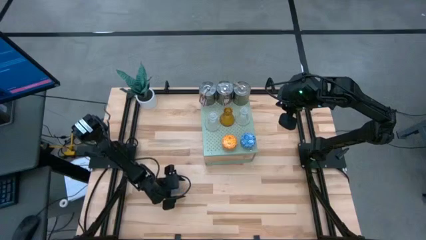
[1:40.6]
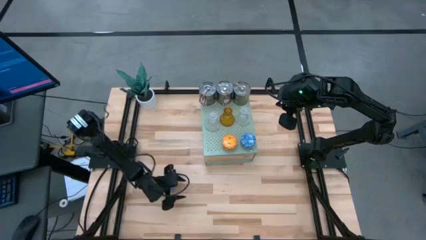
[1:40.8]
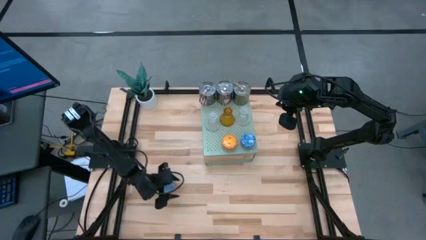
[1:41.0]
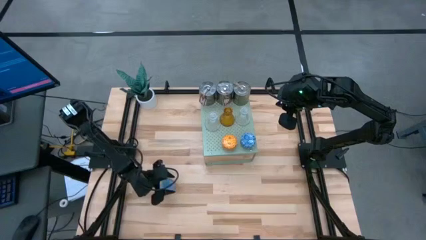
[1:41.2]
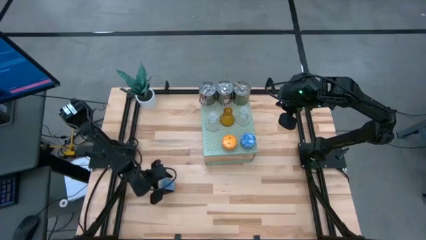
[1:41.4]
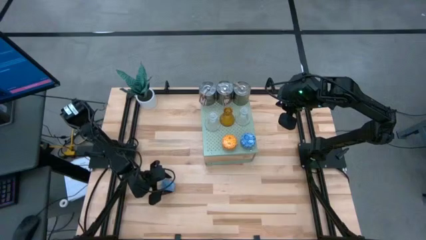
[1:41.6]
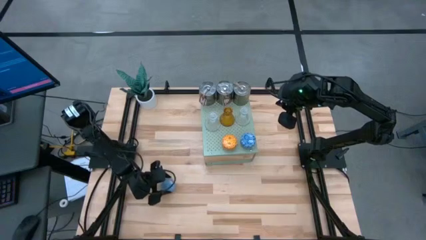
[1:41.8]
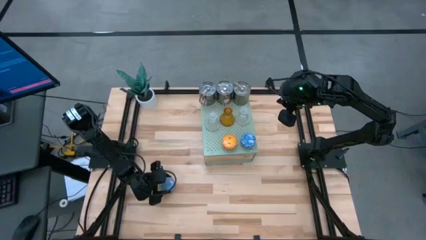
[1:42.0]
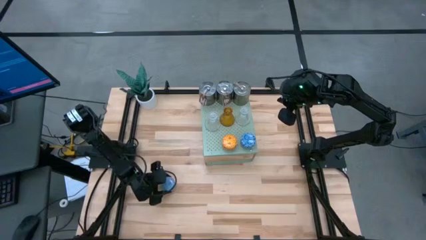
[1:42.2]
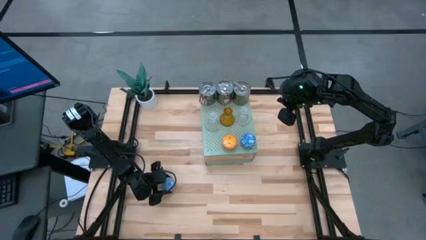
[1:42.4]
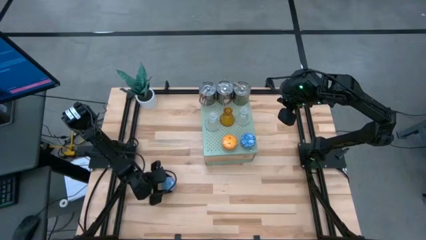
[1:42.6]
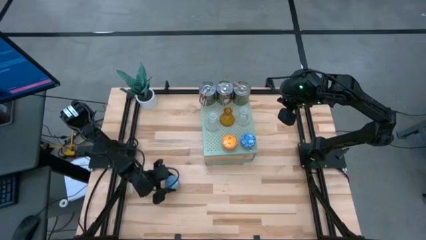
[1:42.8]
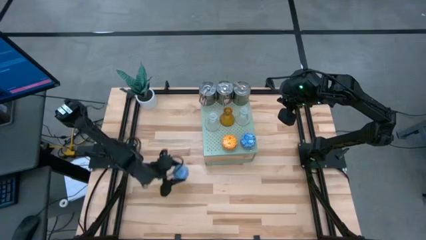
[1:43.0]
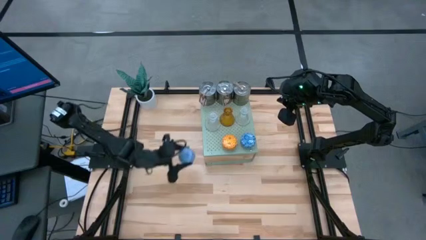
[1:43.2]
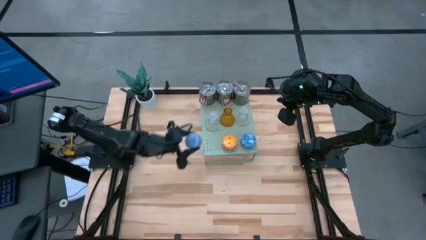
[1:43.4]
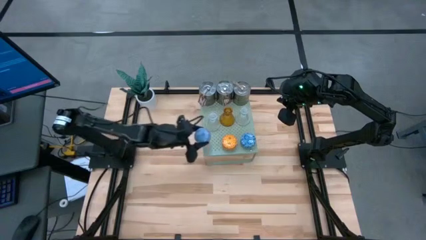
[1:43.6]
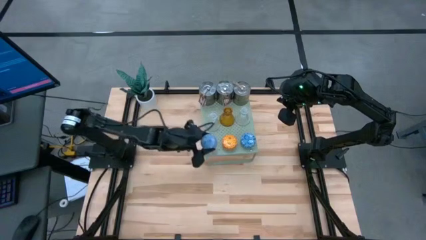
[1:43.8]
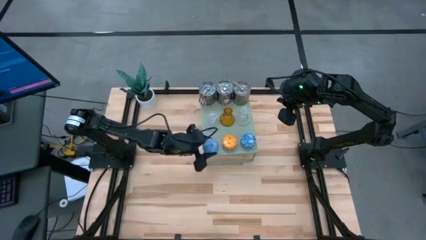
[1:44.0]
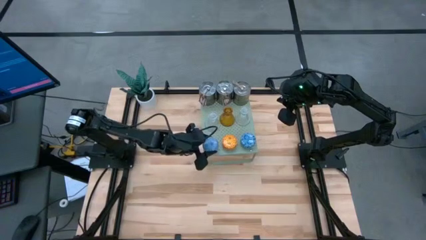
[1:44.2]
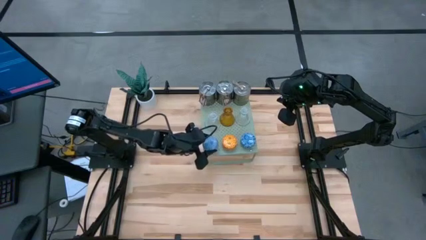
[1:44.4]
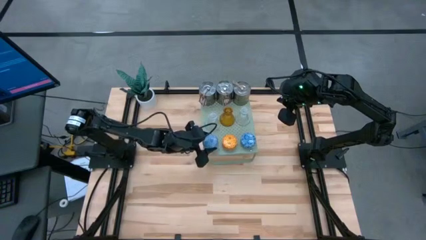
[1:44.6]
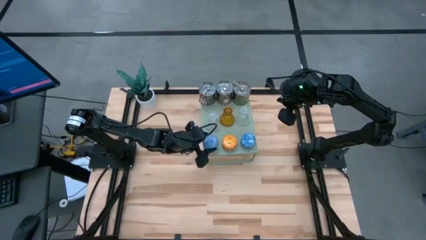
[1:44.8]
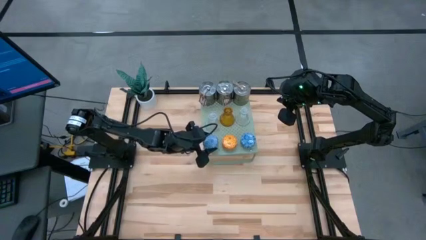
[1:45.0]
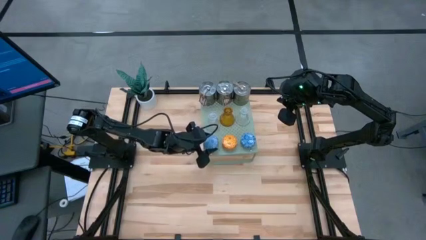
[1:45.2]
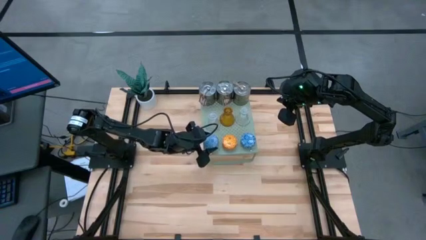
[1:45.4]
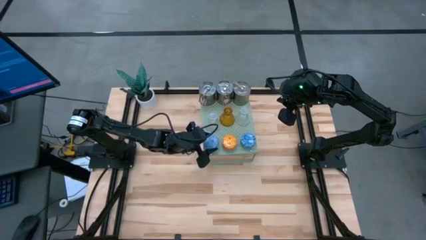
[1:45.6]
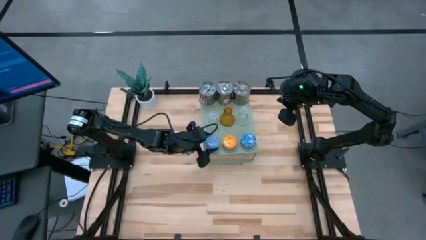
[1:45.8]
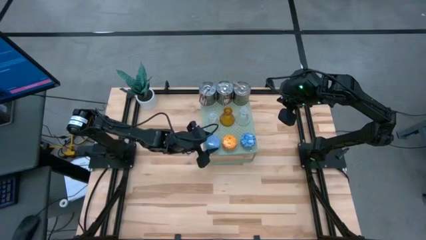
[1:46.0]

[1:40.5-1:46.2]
Task: Pick & Place candle stick holders
Put the blue scented candle on the shelf

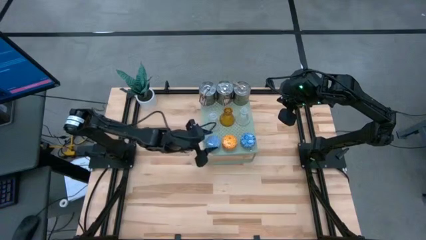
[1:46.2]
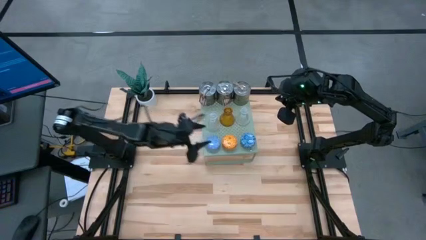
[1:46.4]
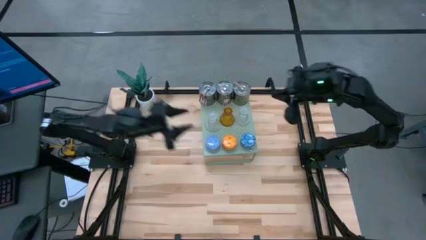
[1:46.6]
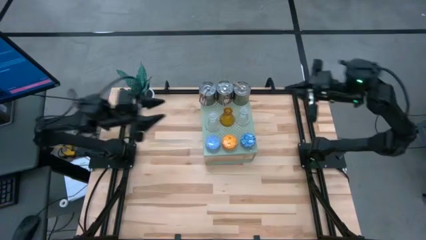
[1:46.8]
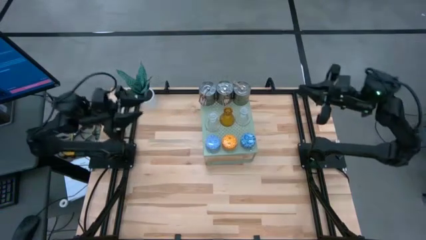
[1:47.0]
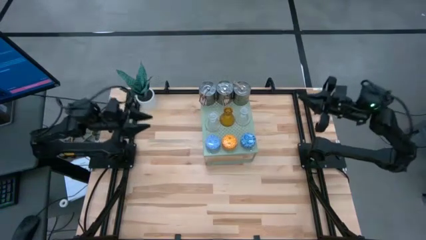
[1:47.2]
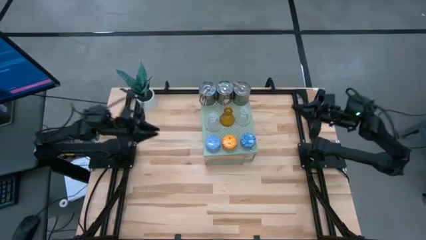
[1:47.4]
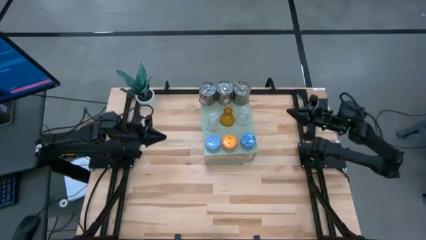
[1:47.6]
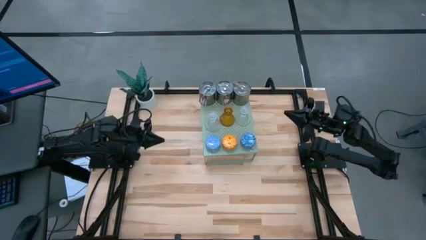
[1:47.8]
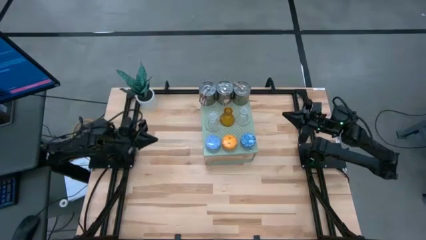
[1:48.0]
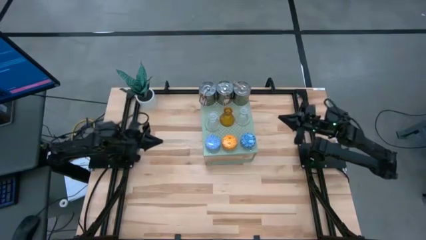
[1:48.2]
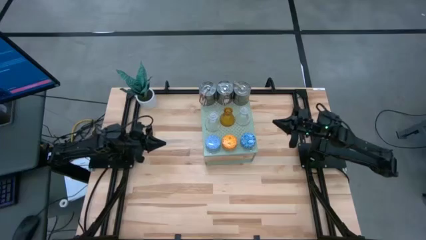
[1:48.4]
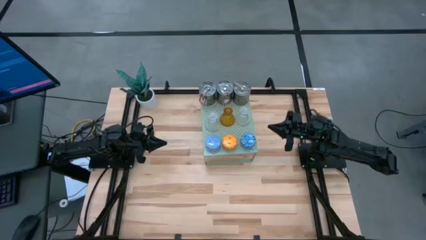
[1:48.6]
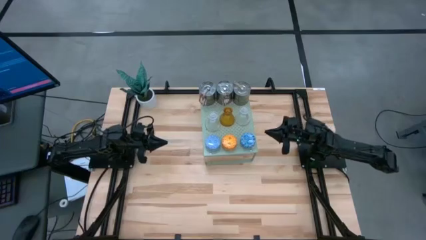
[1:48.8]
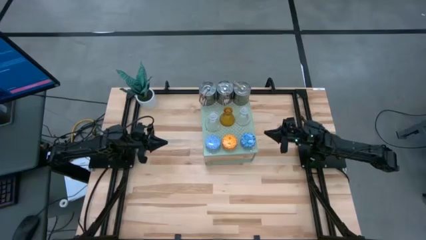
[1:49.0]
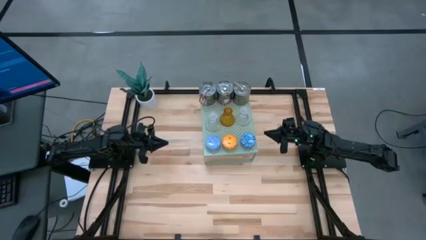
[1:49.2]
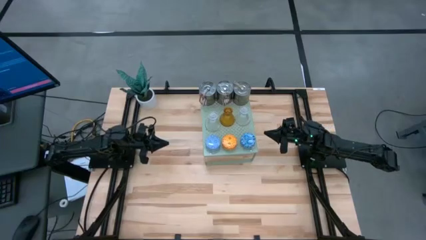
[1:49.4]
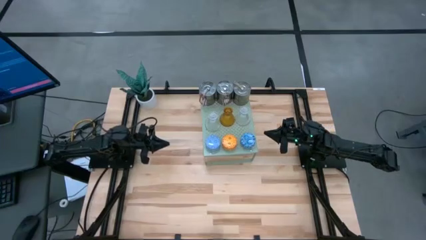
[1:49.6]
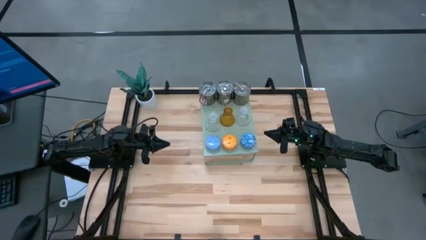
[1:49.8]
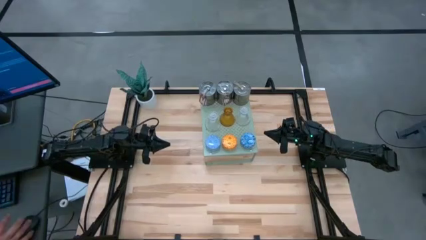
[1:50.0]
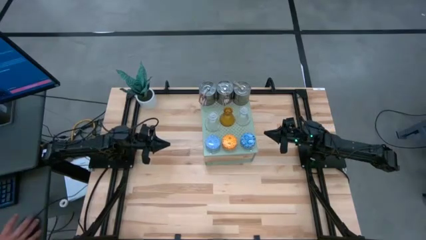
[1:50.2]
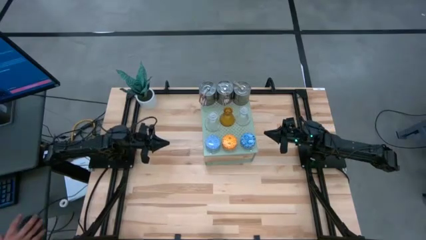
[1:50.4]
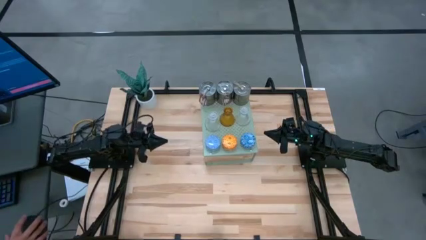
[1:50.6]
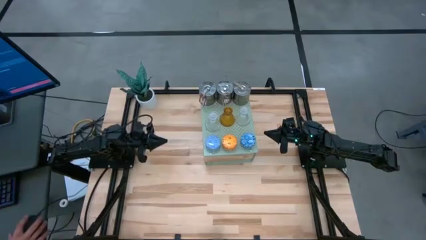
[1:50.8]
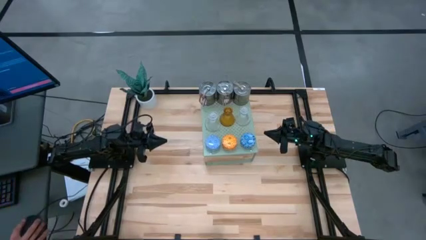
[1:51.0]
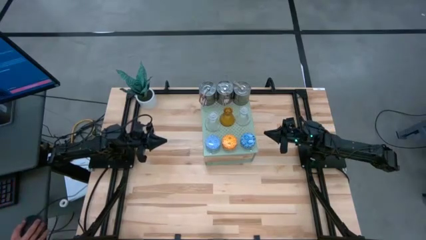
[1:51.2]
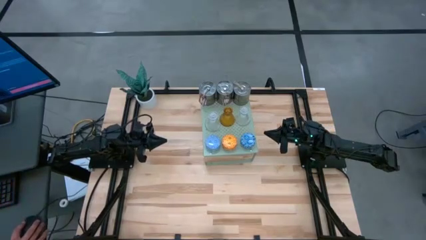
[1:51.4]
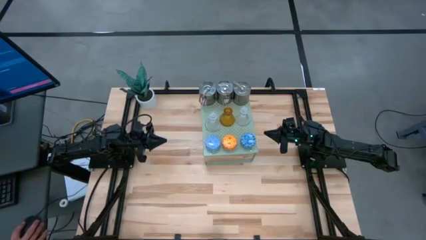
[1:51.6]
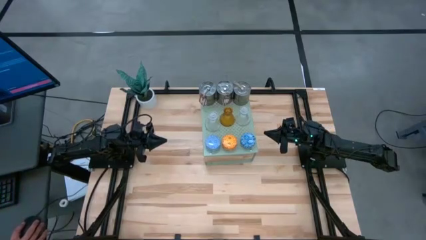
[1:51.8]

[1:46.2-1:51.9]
Return to Home Position

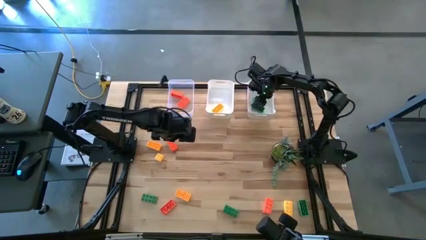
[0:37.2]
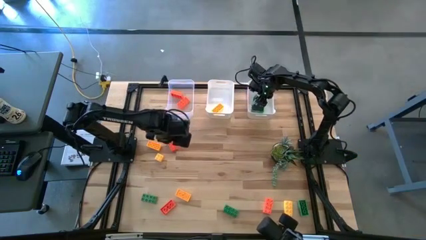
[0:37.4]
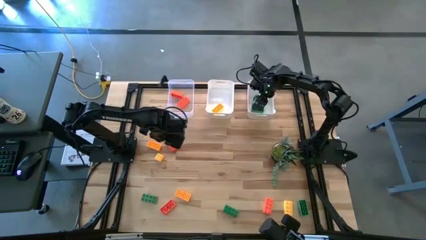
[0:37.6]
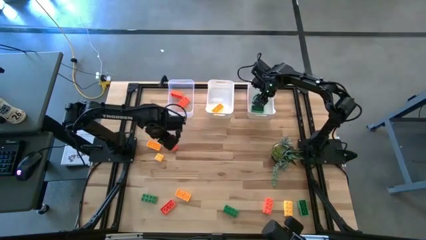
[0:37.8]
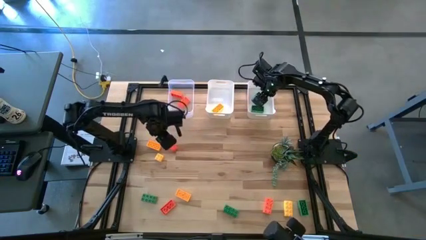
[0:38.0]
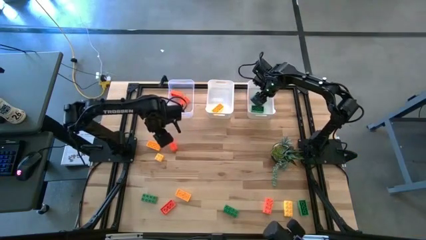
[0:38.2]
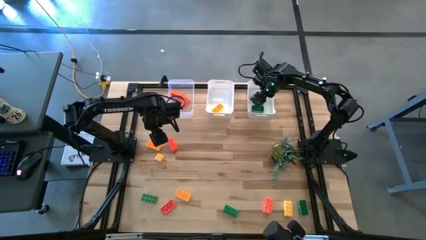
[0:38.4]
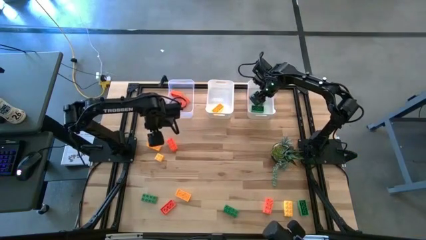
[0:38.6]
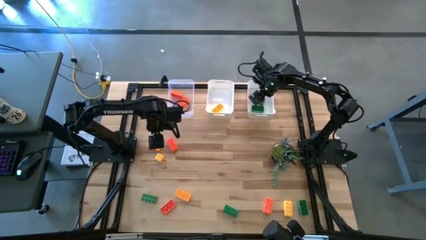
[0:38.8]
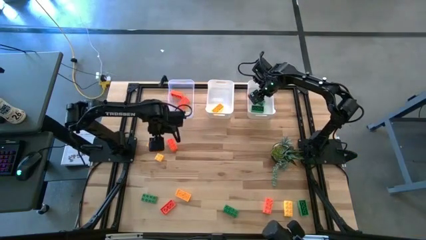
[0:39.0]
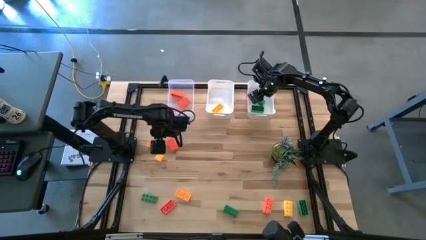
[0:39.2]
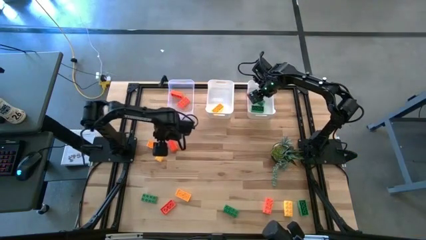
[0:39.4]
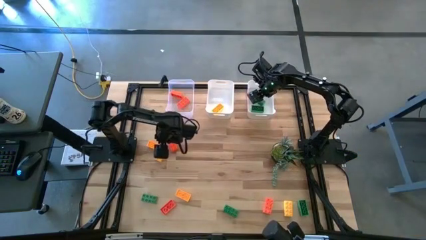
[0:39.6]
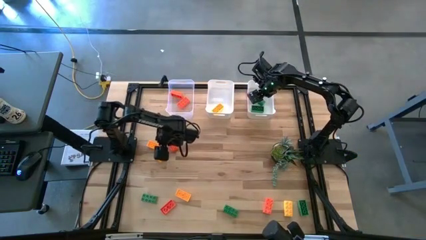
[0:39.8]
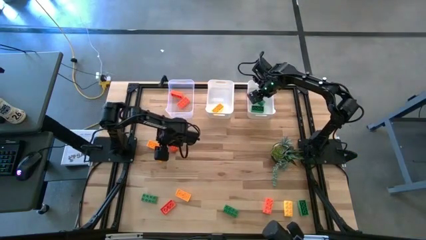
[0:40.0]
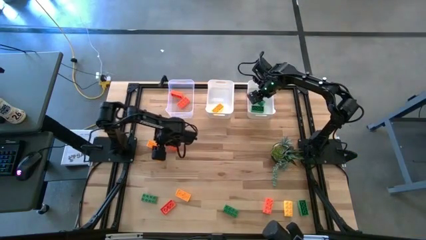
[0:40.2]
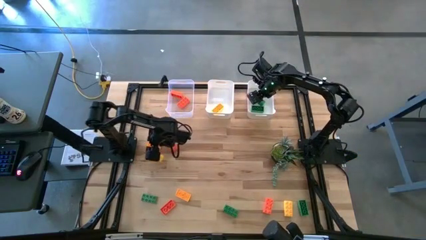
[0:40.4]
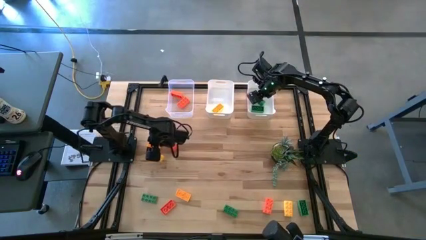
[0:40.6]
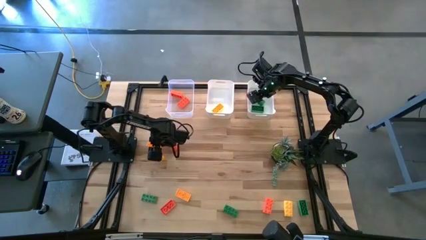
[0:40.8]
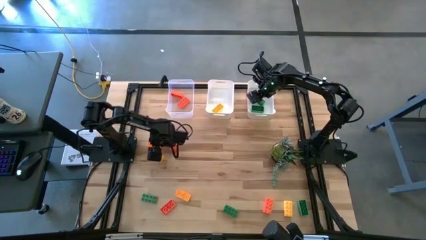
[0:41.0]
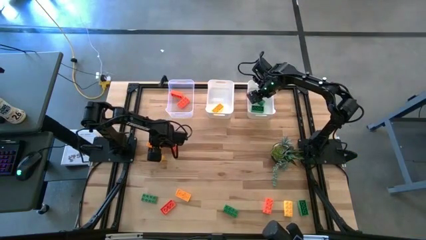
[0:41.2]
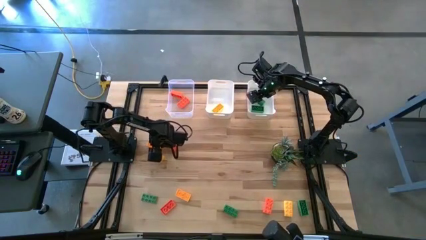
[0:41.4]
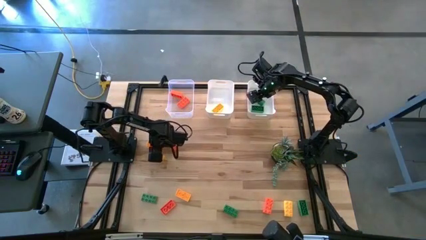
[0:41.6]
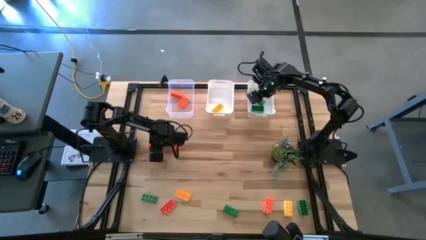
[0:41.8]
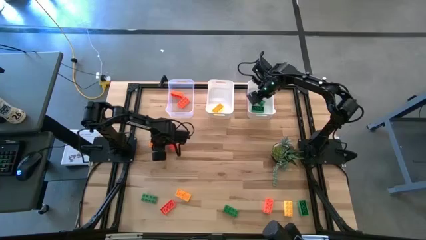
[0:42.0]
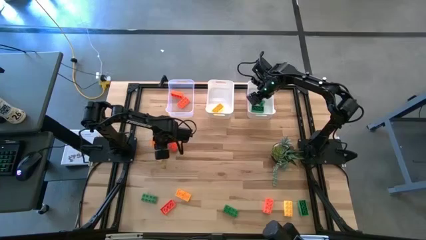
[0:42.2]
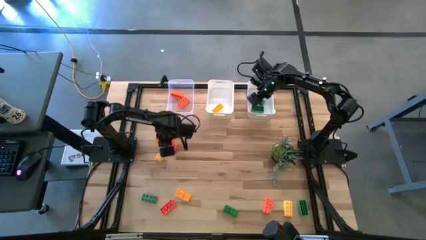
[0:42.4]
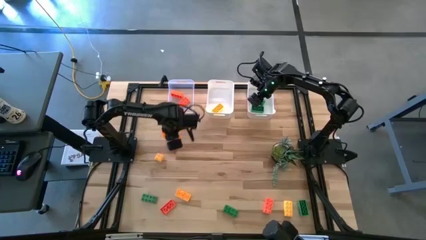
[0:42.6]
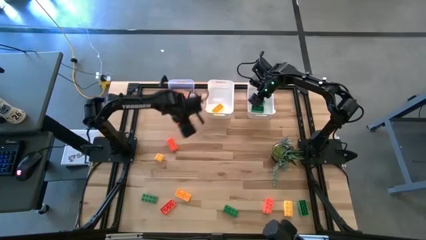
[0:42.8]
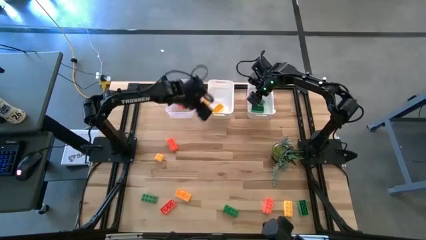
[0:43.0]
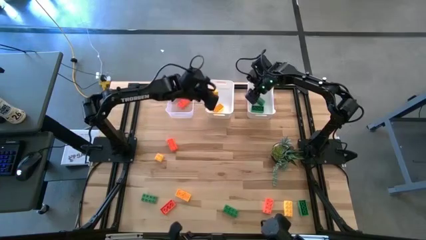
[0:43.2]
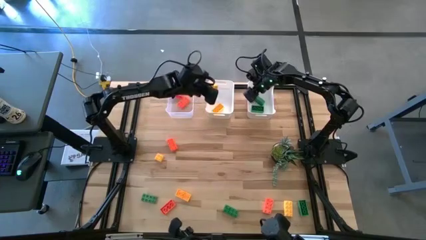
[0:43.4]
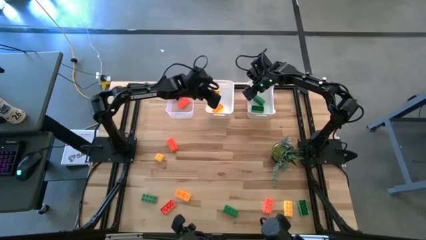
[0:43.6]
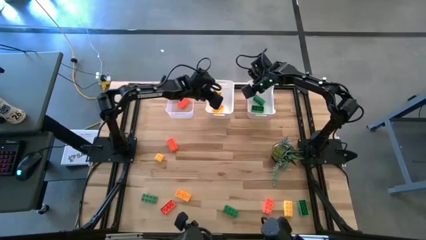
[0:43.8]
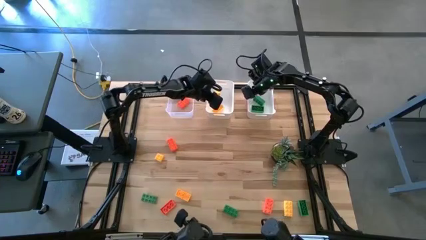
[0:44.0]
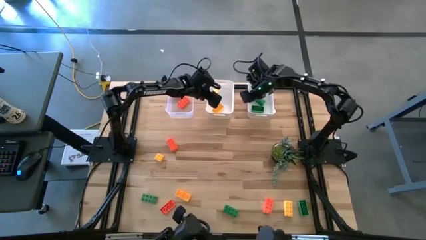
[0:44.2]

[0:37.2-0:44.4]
Task: Sort & place blocks by color
Put the yellow game piece into the left white bin
